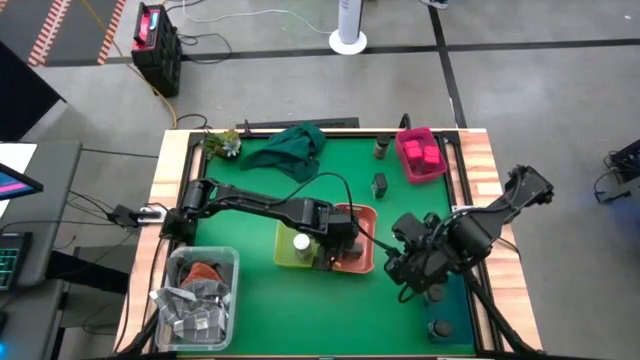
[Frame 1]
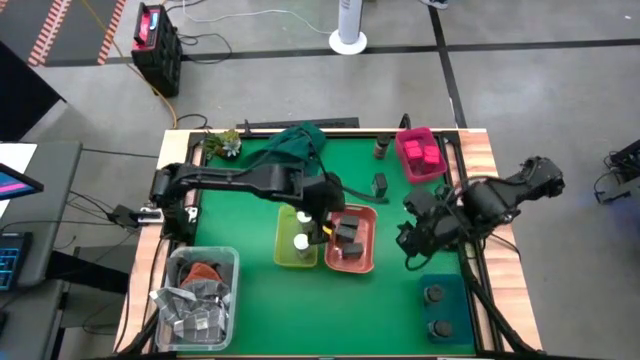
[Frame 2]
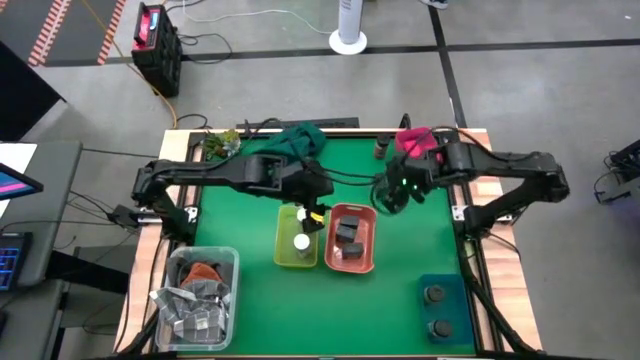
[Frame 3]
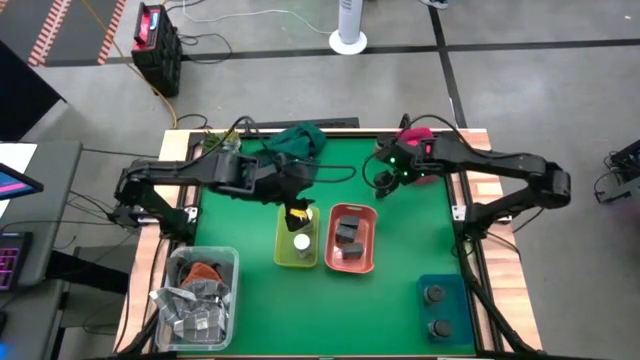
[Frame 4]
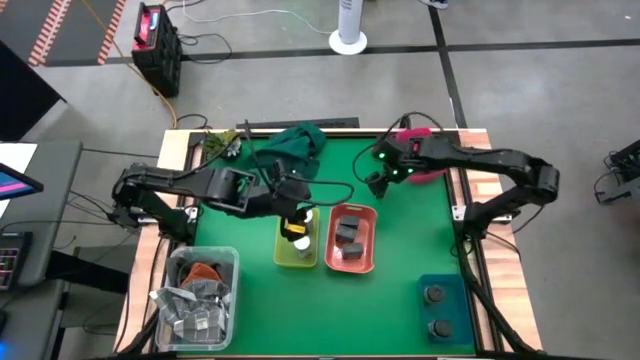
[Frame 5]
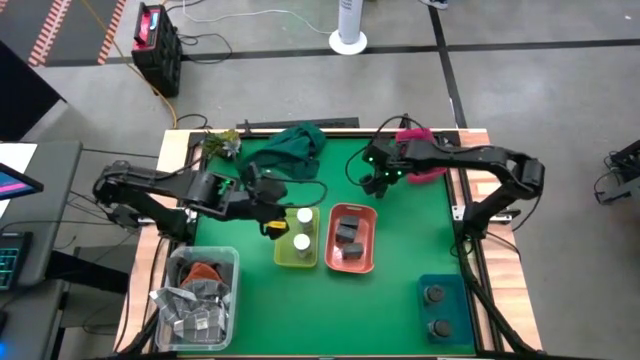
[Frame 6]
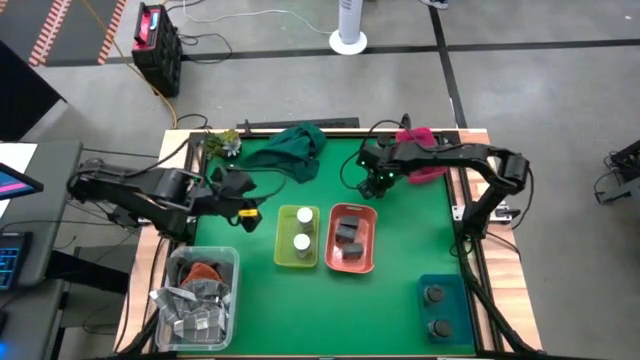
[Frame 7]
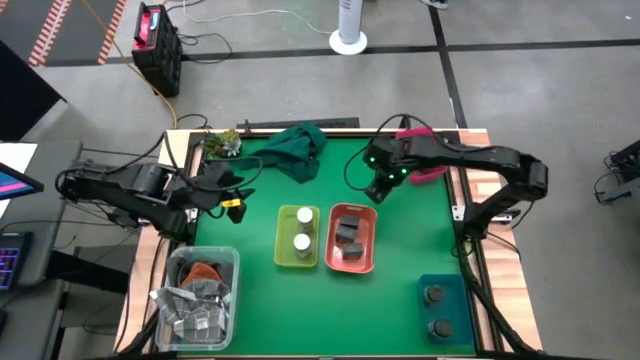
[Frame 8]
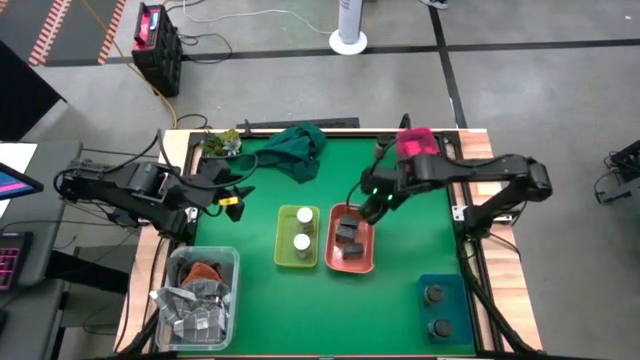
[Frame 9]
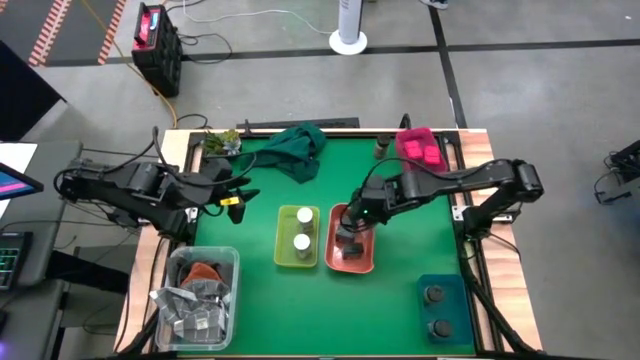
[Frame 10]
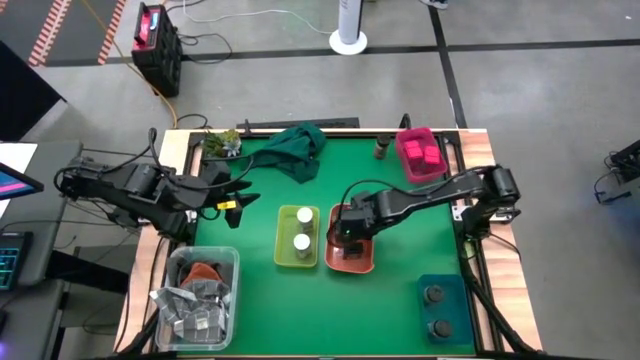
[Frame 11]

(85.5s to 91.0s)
Task: Sort spices by type
Put the black seasoning can into the orange bin

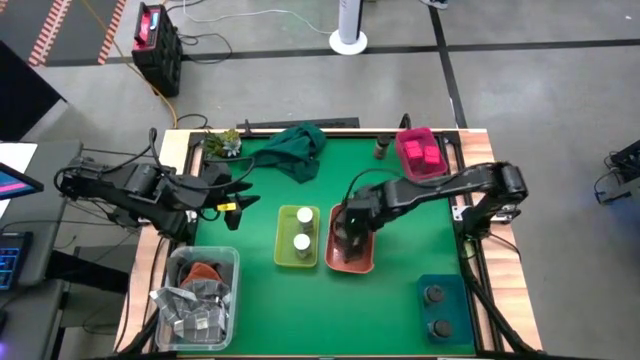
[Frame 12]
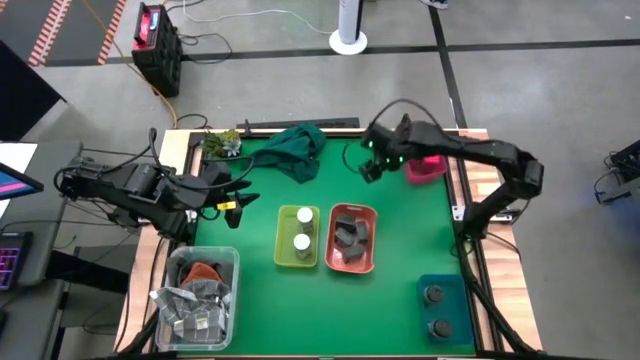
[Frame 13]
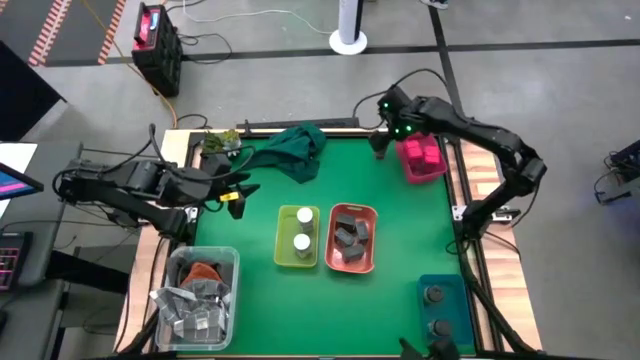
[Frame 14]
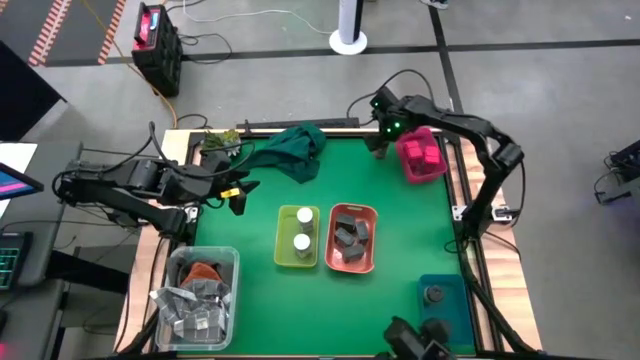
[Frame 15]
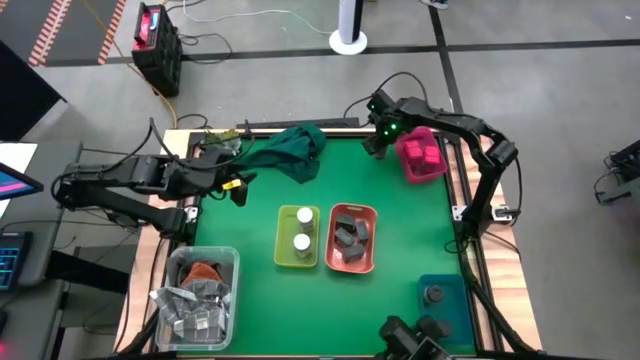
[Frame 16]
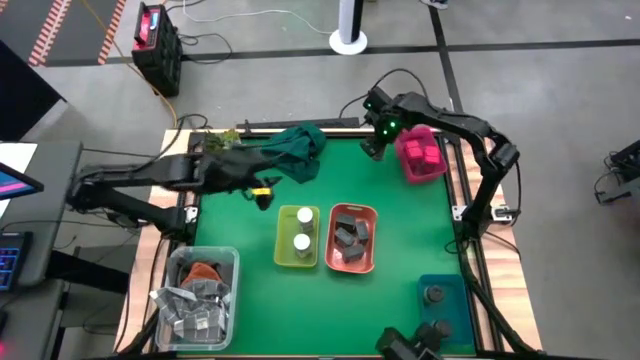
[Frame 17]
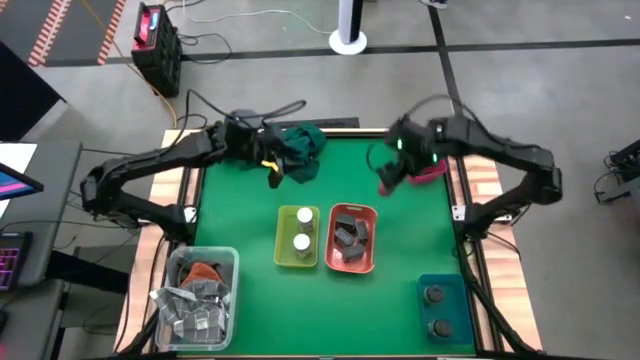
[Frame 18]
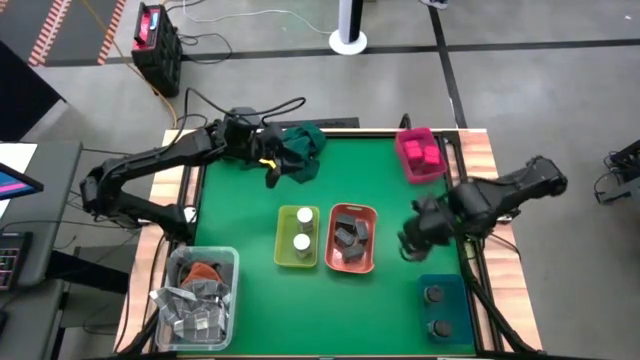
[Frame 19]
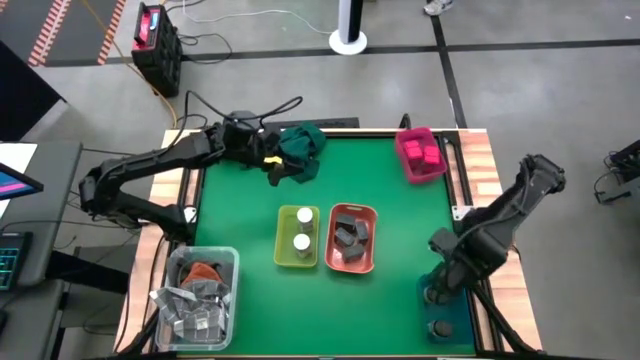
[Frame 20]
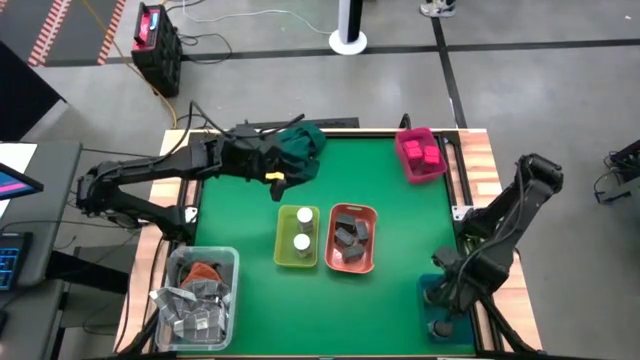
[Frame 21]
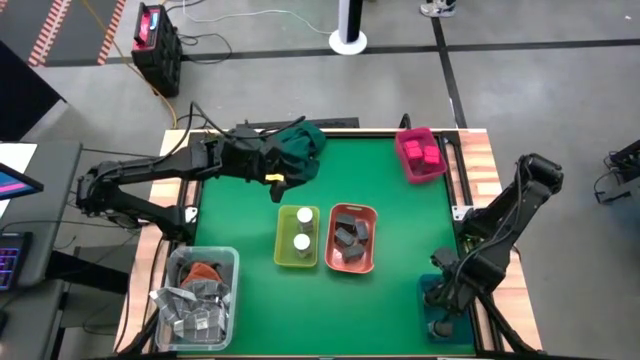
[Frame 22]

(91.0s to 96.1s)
Put the black seasoning bottle into the blue bin

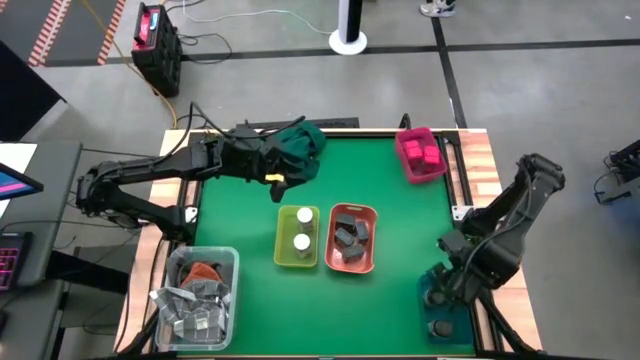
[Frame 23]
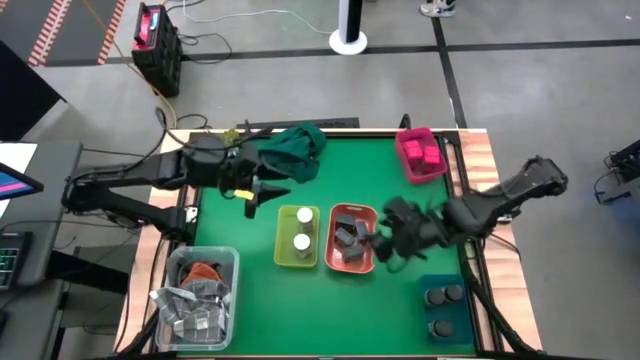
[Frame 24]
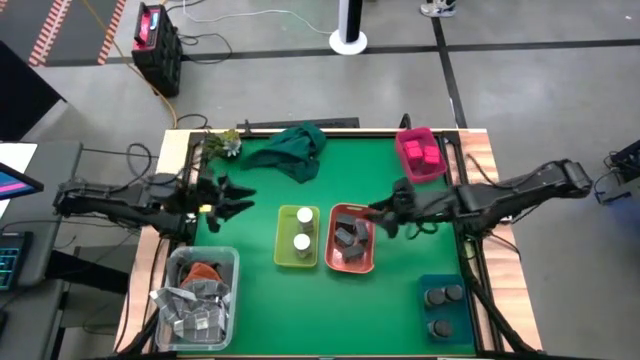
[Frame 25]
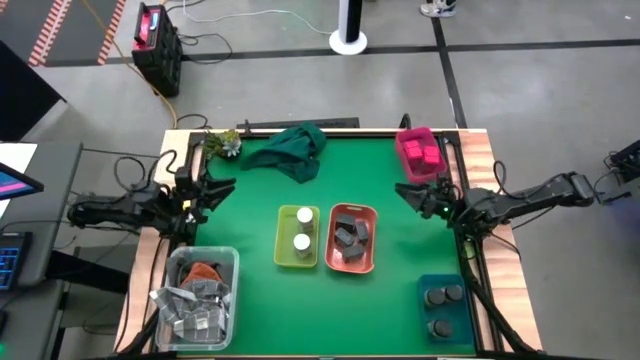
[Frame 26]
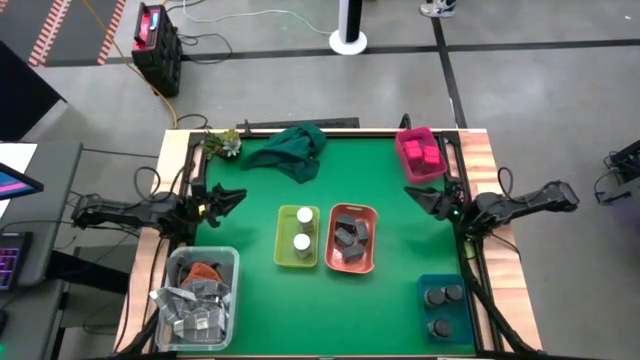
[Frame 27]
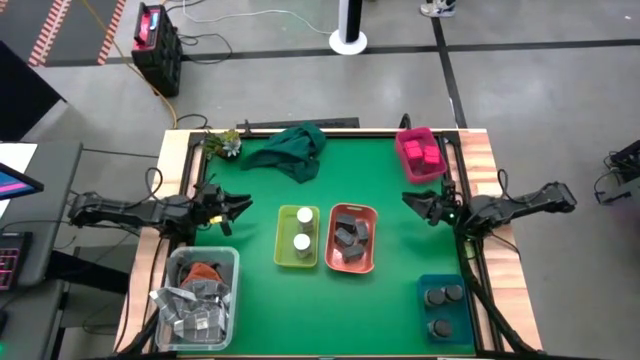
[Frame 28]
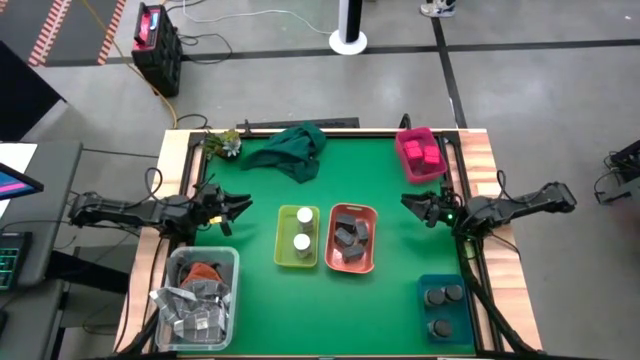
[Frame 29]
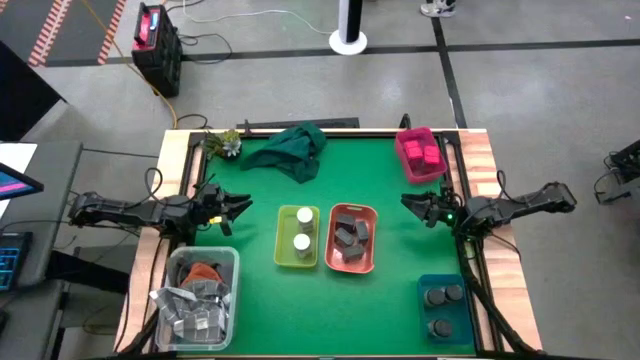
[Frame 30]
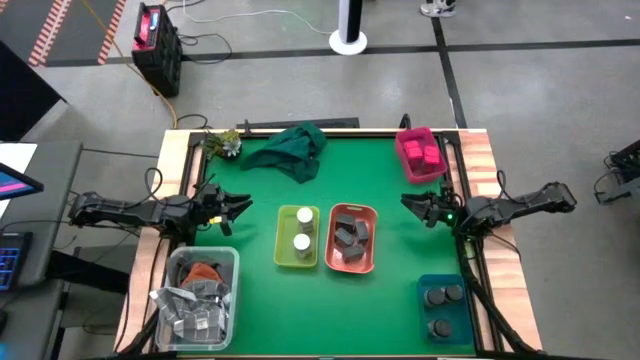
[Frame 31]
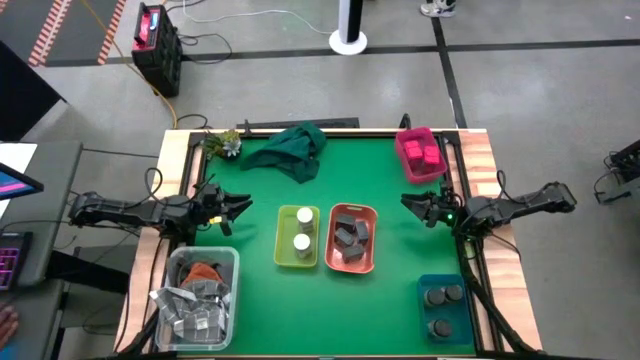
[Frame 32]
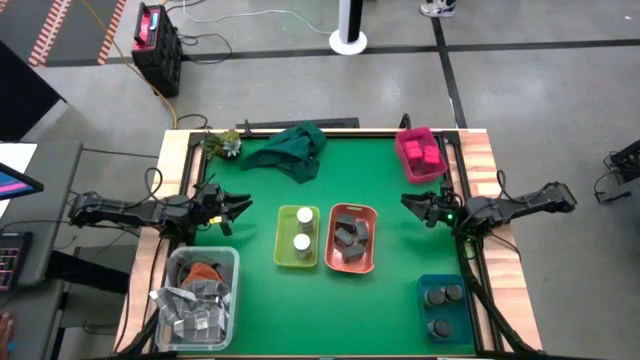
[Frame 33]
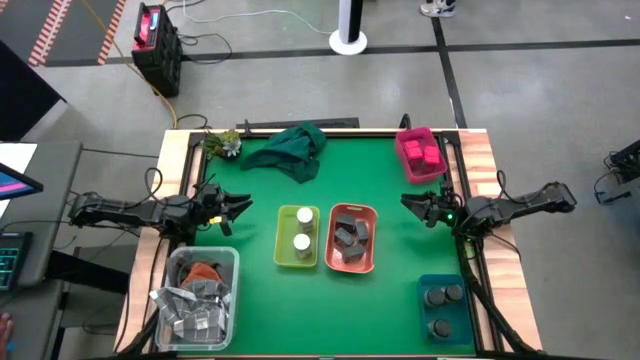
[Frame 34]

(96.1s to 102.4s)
Return to Home Position

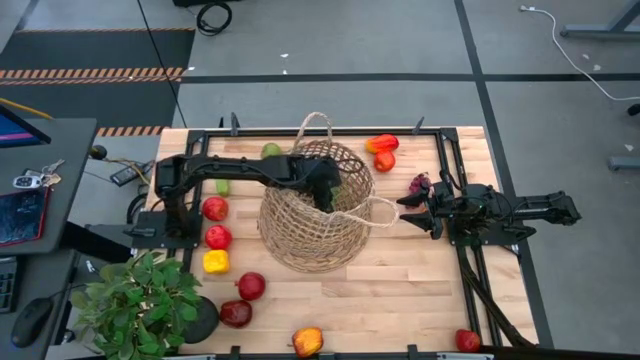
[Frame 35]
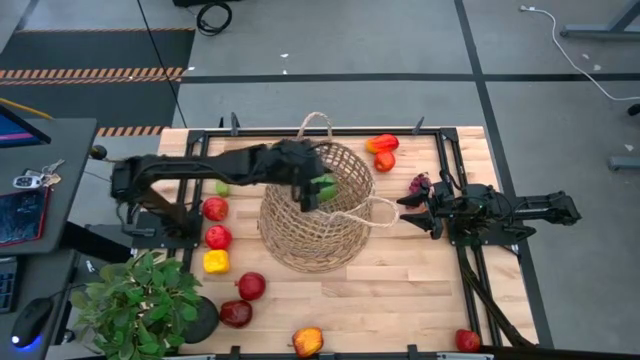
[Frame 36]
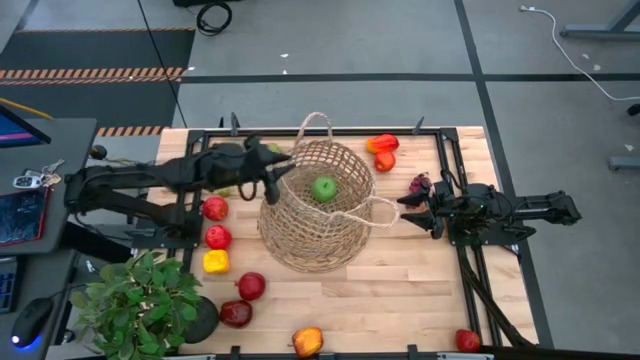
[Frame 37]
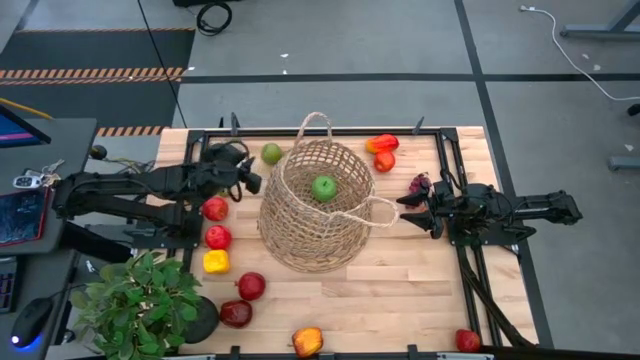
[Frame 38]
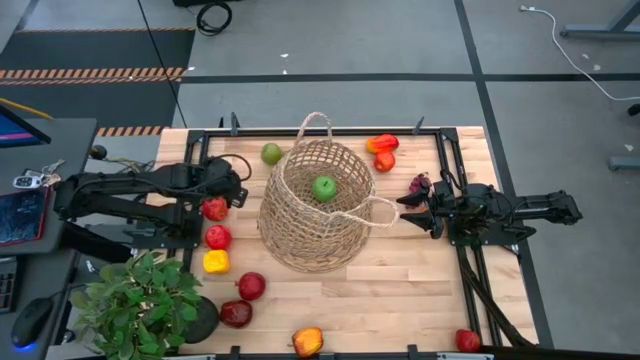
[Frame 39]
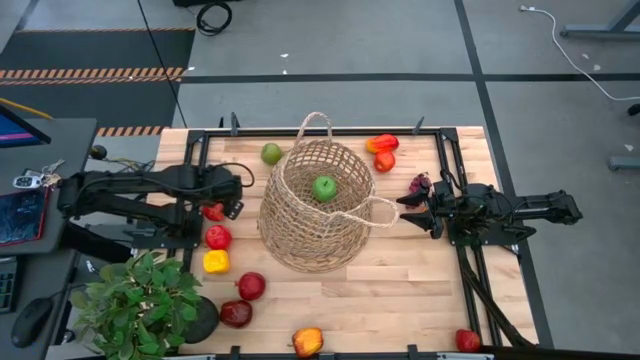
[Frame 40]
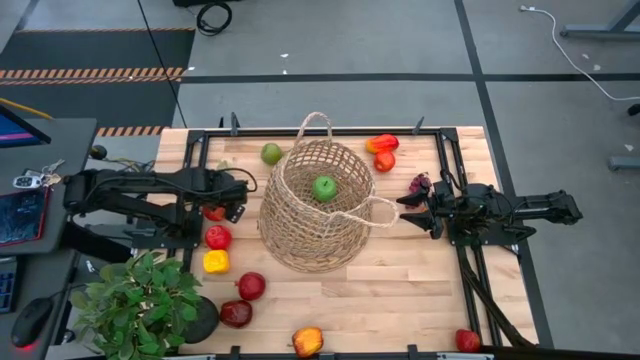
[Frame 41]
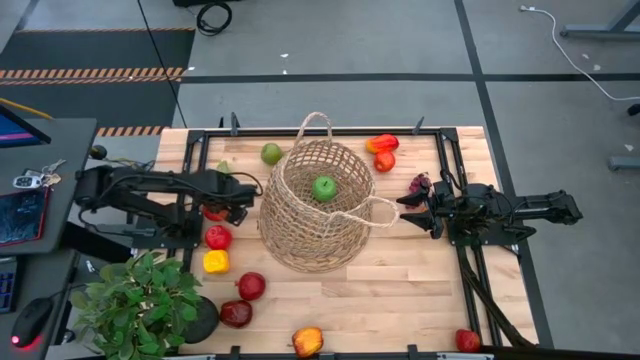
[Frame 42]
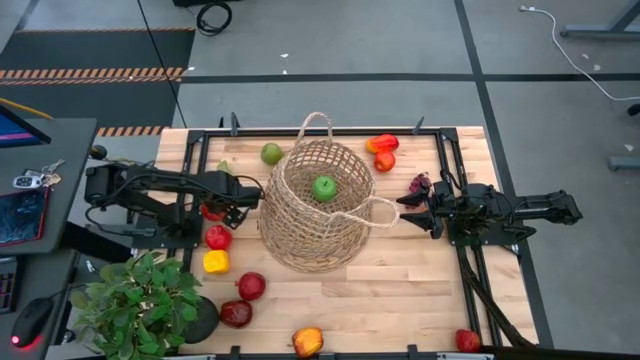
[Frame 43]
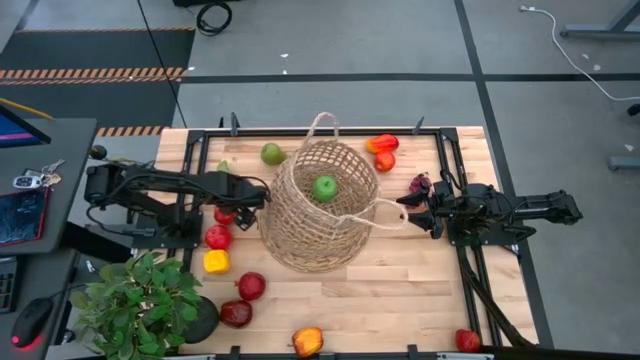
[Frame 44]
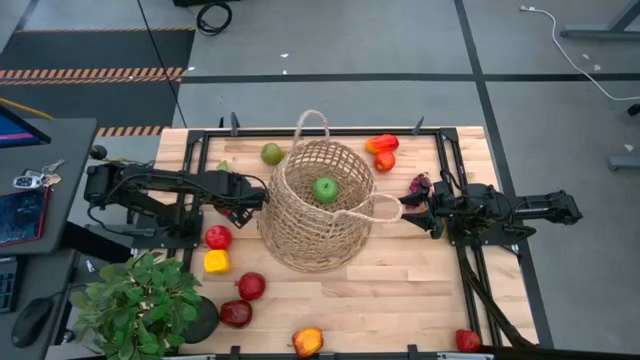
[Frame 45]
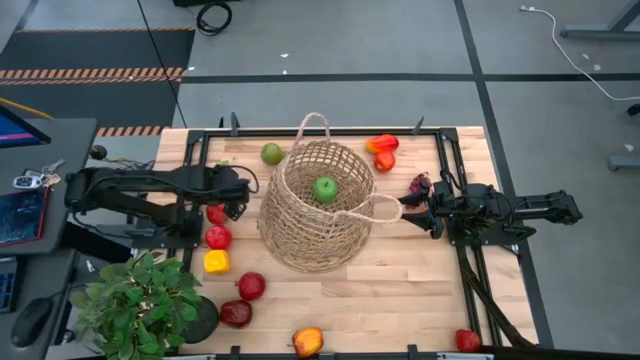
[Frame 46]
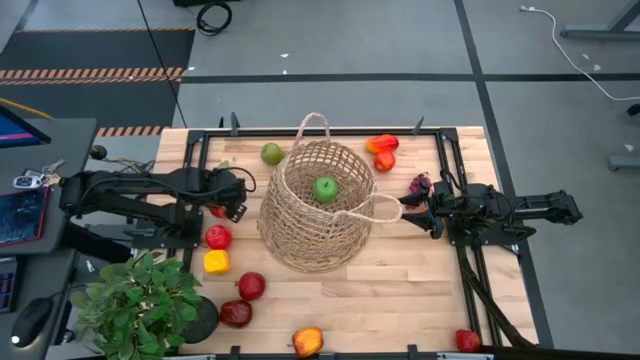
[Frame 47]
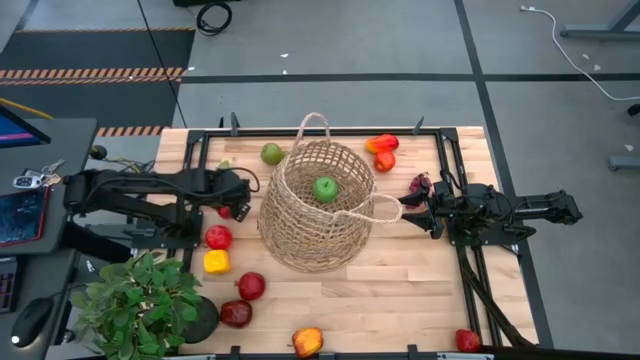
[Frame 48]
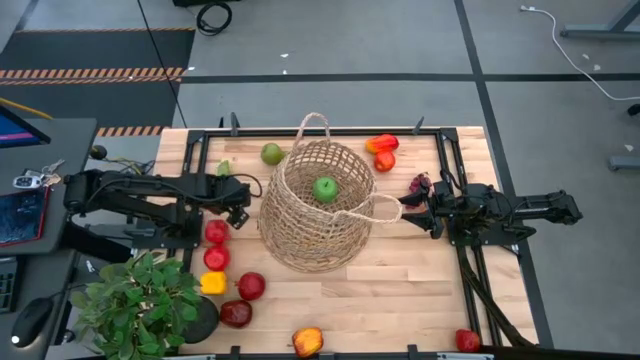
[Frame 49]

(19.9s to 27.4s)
Task: Build produce basket
Put the red apple into the basket
